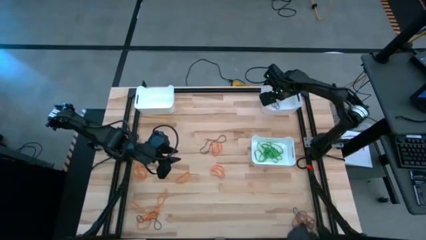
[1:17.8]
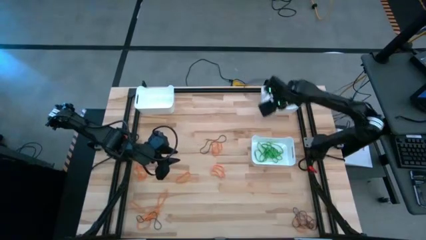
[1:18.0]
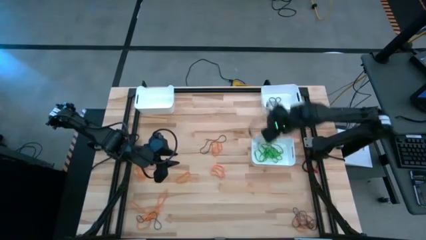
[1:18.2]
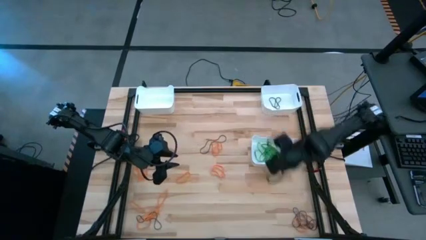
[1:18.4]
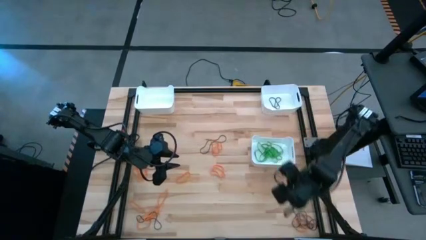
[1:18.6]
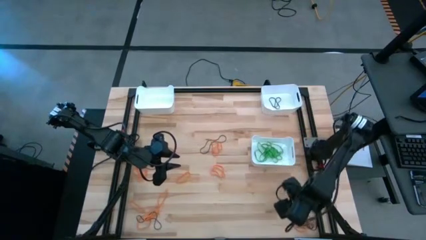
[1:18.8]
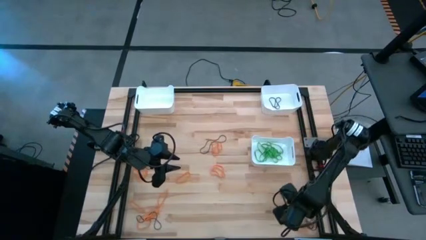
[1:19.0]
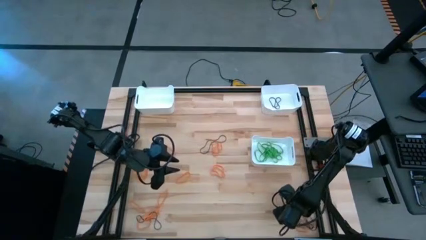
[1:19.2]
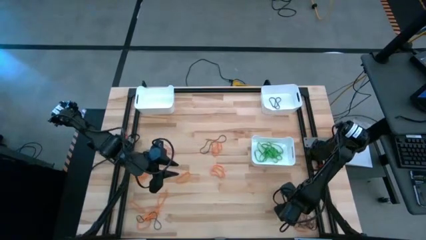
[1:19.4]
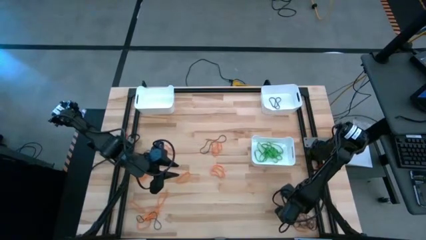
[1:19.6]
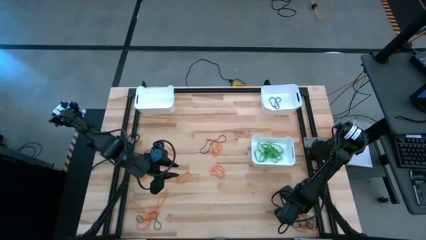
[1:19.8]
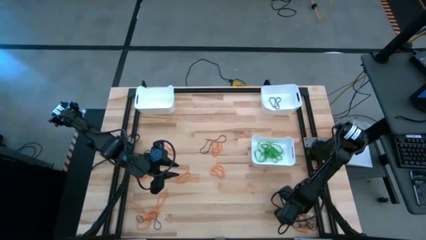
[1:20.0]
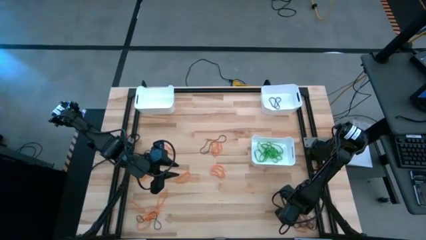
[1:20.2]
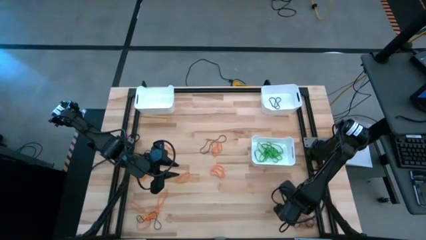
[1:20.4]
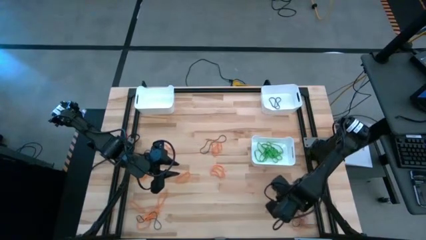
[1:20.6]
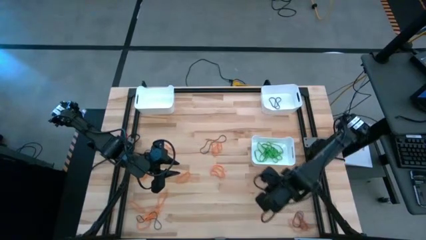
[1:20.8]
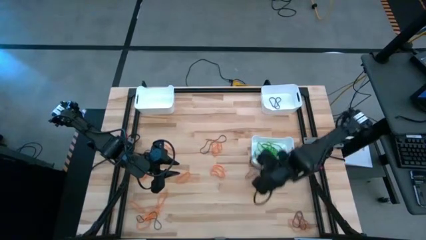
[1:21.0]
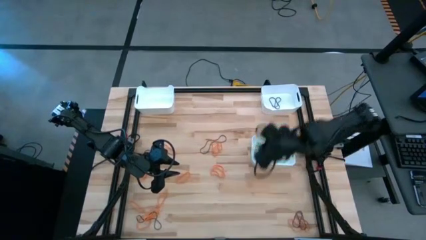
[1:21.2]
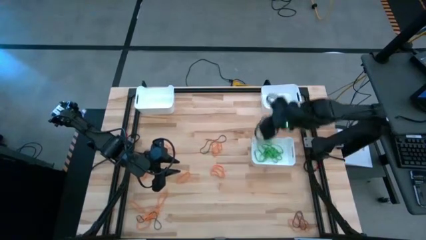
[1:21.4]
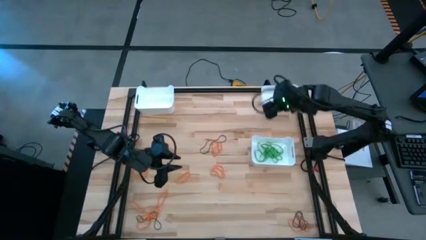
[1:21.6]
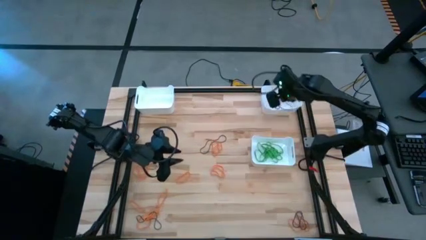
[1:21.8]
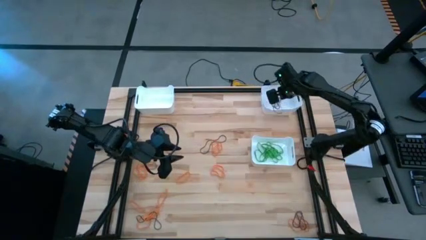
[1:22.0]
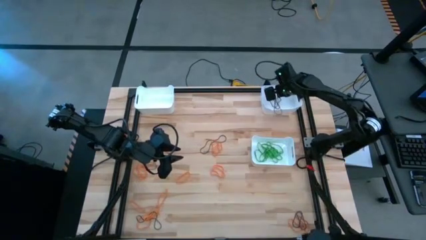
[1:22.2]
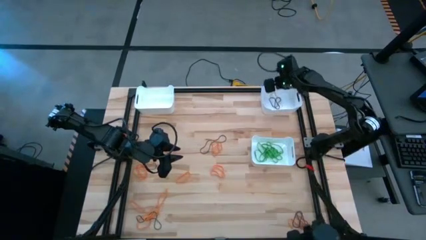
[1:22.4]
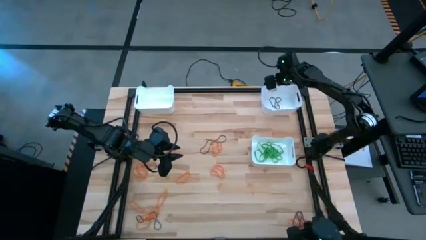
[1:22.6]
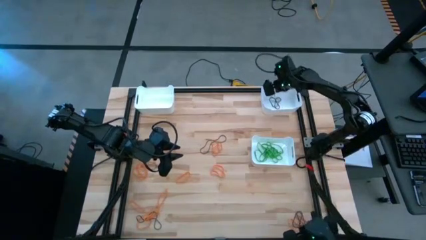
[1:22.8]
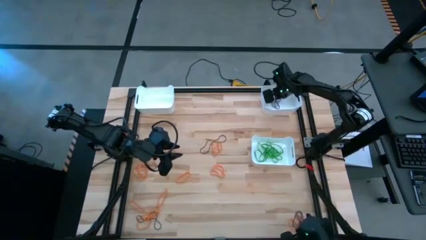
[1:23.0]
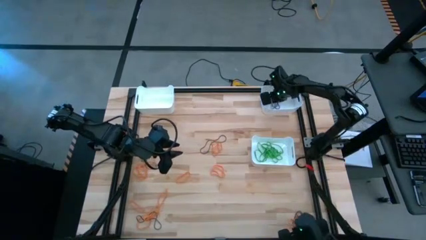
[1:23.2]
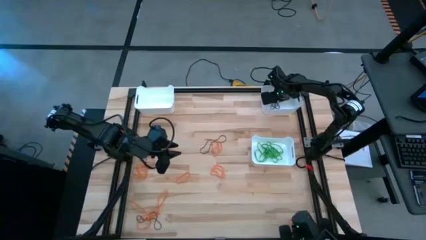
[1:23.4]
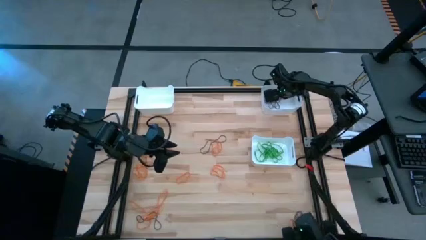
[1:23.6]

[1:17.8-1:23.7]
Task: Sort rubber bands into baskets
Put the black rubber band into the top right white bin

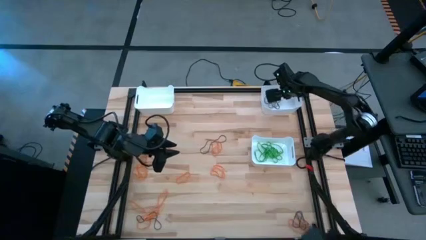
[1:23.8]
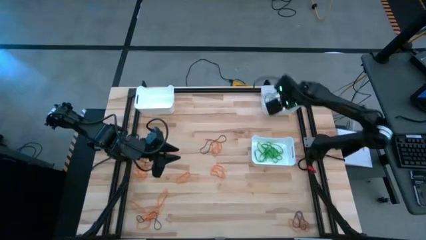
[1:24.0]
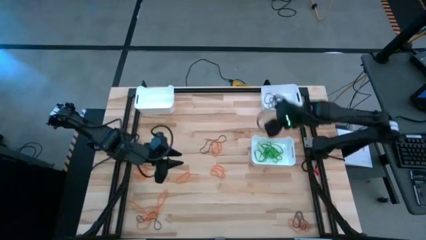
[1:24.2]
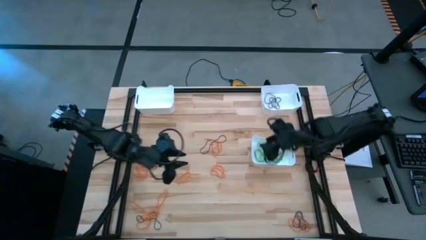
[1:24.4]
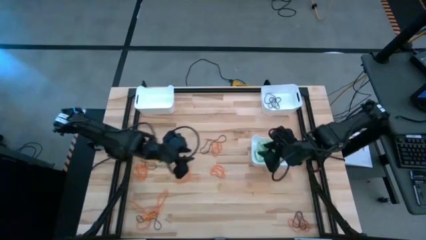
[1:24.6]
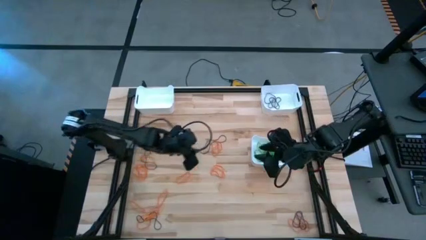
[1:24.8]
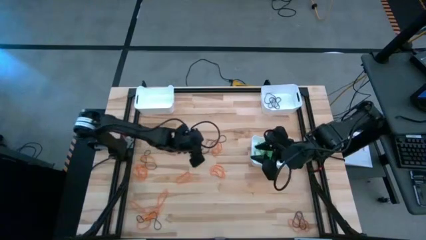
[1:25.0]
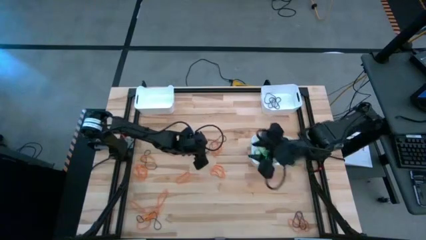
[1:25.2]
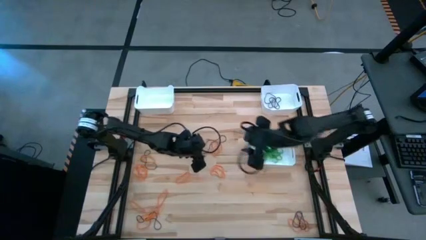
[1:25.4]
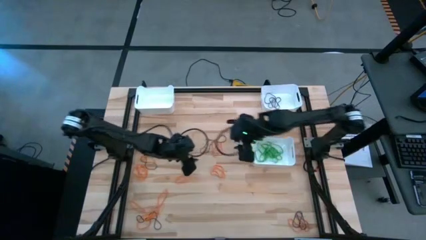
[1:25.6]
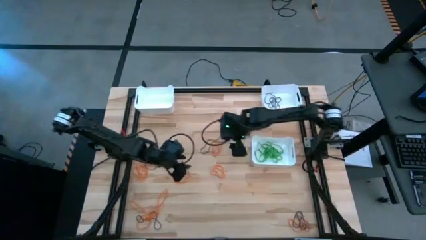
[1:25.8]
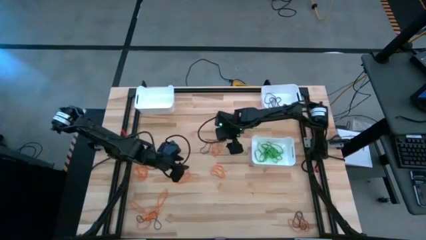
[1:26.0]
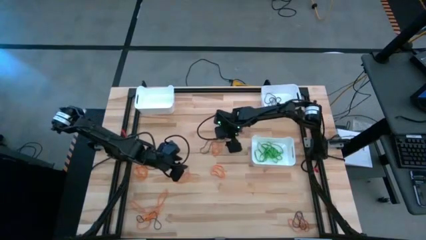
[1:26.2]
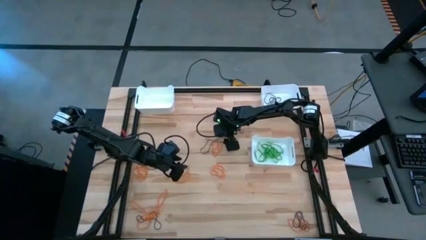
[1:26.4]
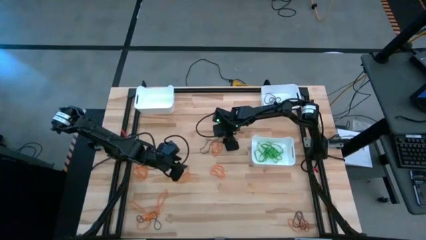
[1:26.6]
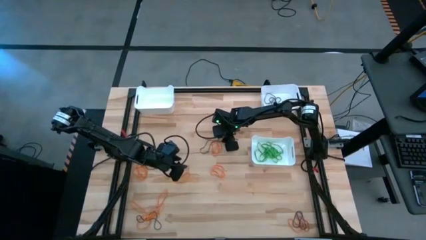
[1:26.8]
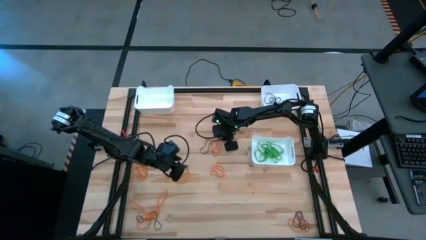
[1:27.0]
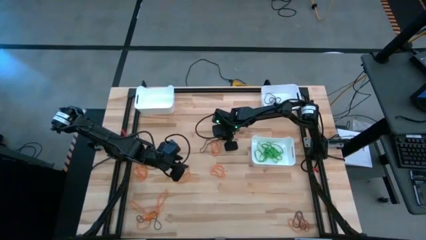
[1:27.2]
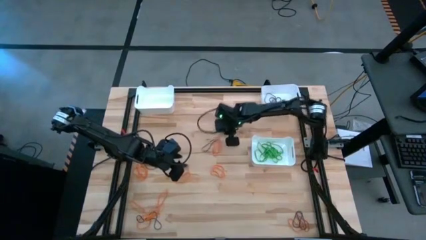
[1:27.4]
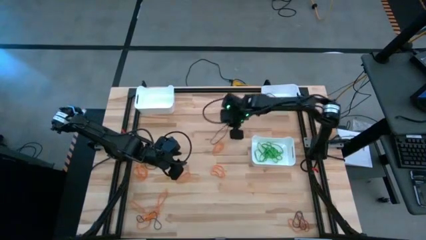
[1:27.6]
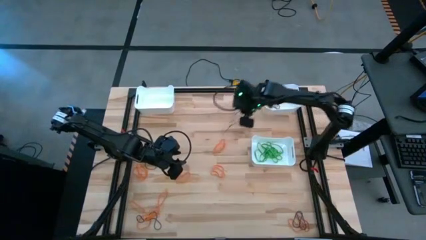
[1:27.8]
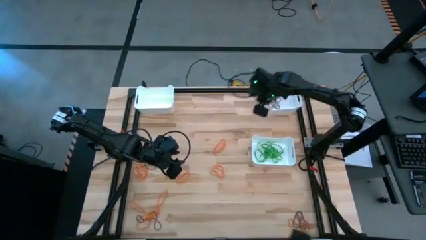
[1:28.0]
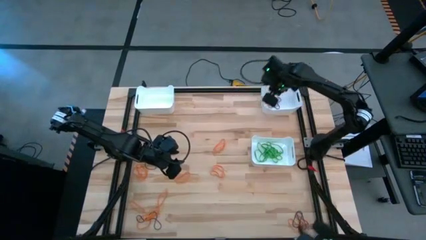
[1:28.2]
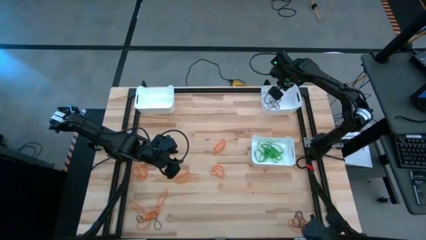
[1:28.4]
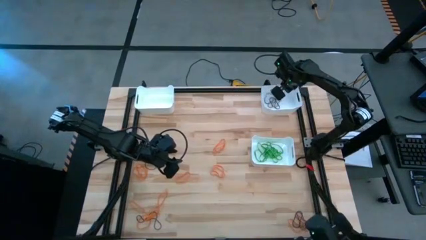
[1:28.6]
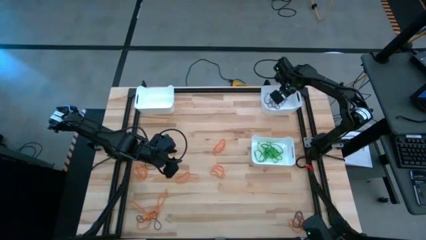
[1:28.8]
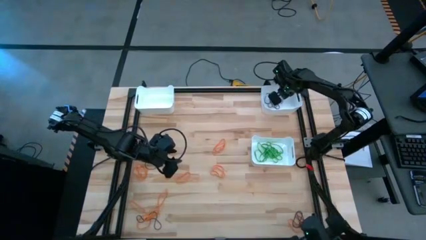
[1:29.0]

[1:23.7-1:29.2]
Put the black rubber band into the top right white bin

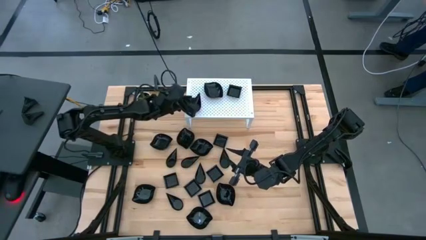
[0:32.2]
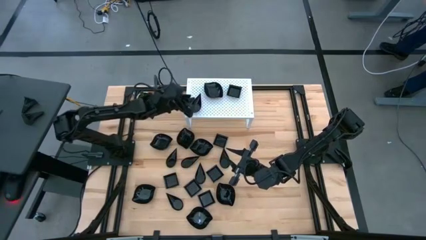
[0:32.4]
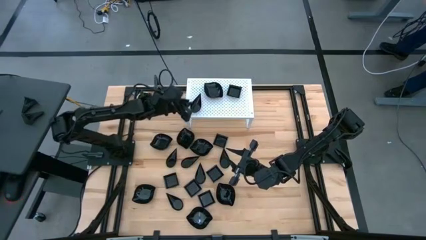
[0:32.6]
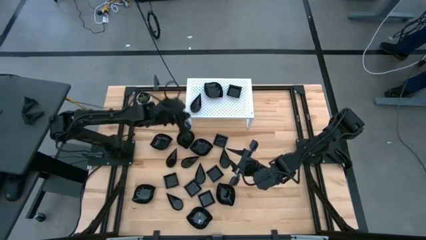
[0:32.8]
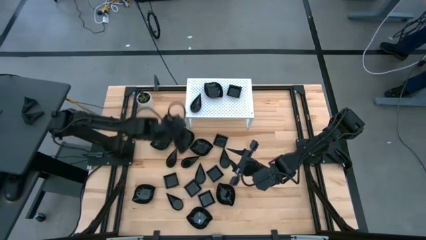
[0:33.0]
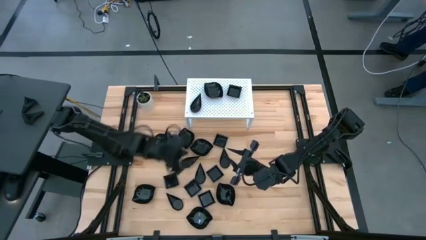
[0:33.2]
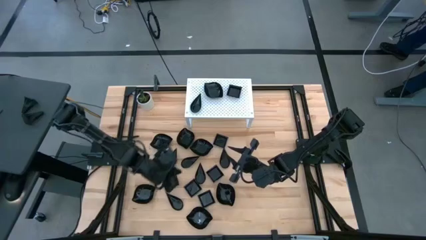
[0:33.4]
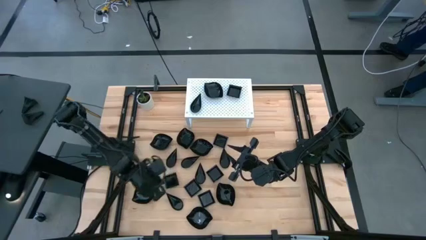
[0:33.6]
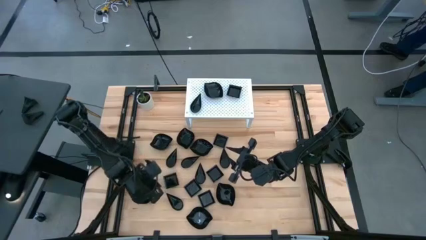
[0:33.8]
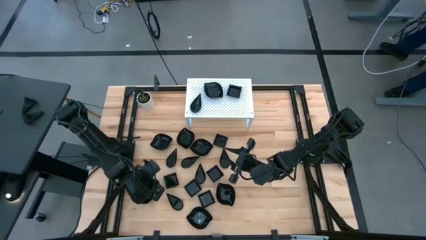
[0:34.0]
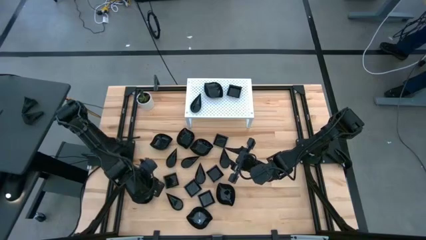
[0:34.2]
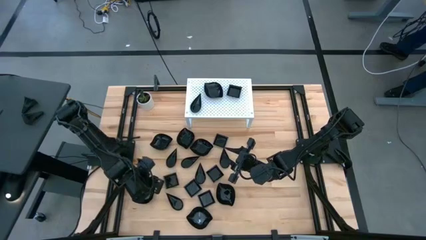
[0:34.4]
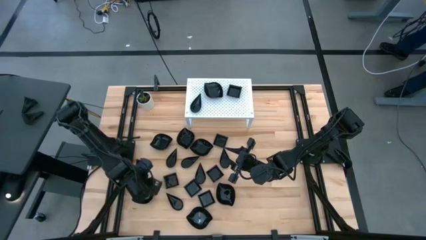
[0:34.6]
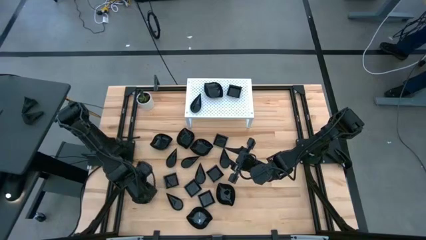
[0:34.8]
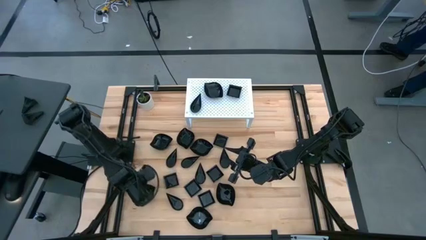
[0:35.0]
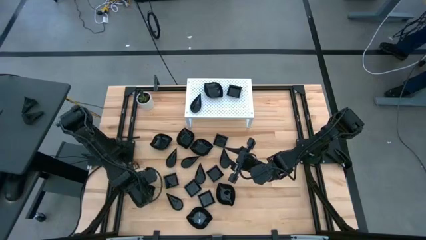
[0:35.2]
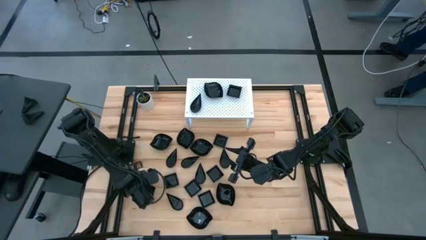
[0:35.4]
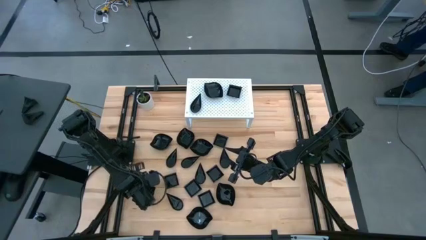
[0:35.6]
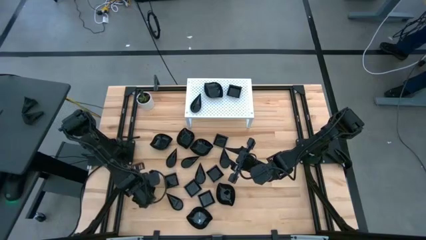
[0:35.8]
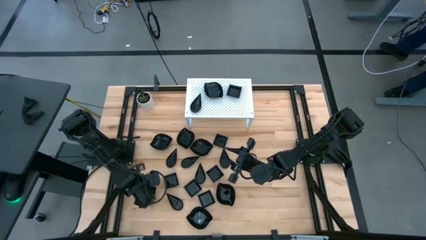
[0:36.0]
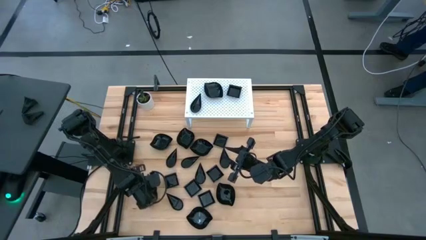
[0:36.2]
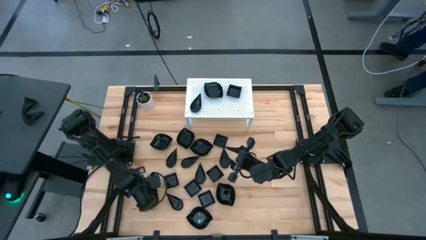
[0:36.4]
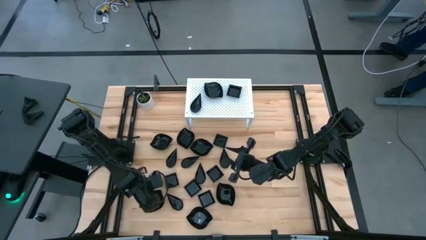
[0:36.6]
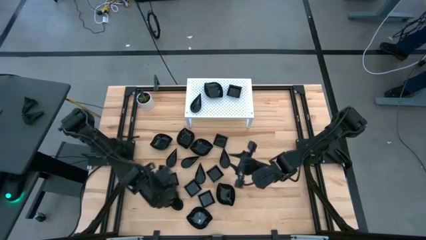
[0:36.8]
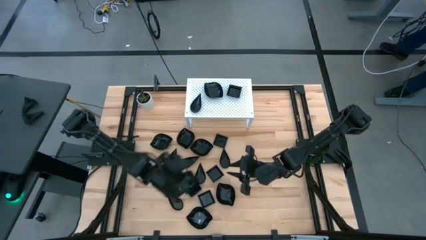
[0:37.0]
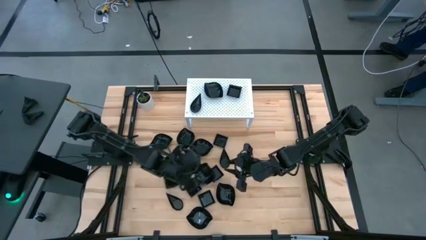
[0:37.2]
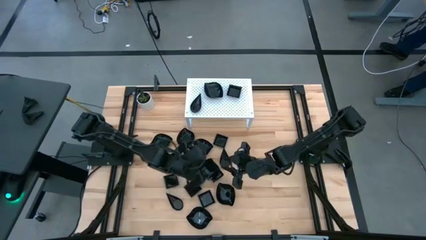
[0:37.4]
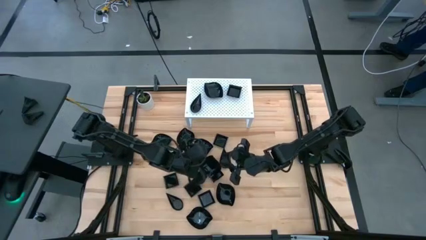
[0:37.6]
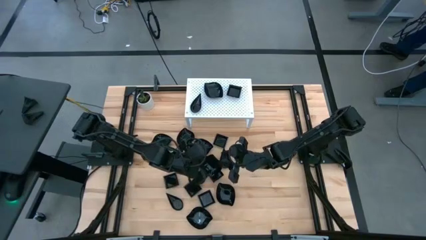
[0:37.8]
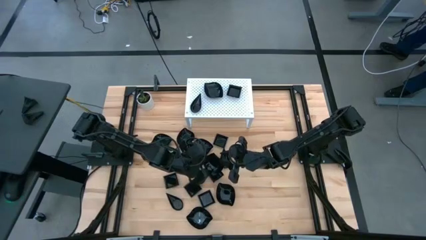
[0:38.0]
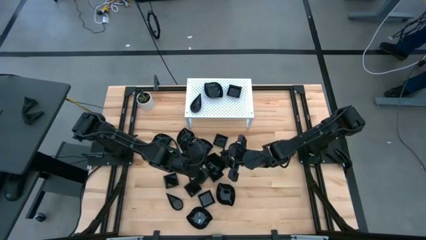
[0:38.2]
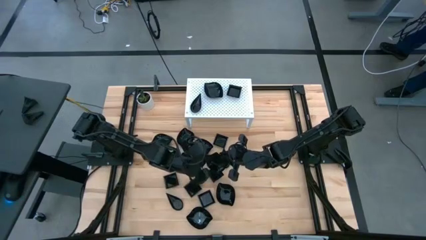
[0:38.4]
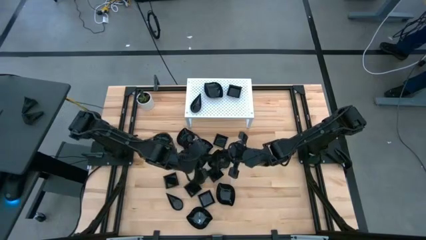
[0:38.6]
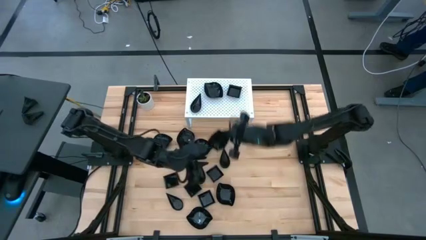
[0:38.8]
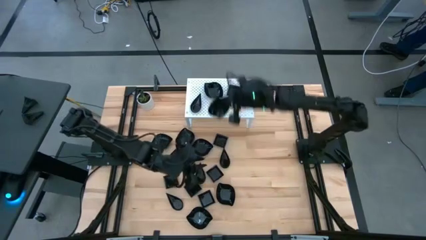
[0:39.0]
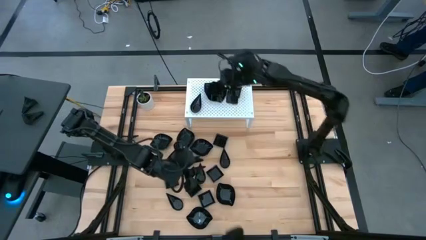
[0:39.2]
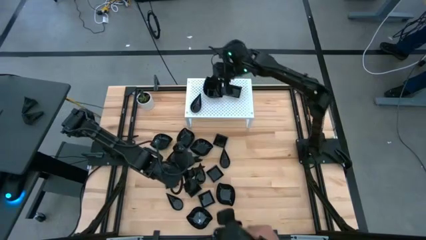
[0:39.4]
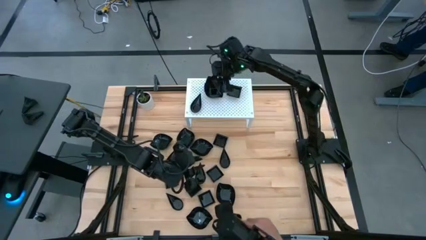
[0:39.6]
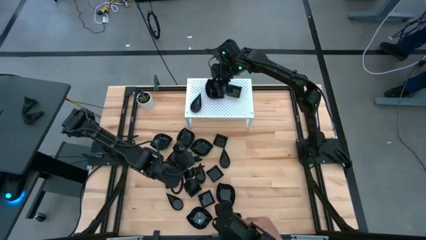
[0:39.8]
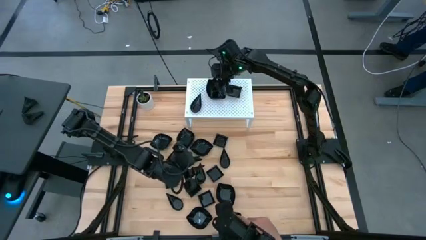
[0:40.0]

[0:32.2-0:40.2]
Task: Pick & Place Mini shaped plates
Stack the black leaf-shaped plate on top of the other black leaf-shaped plate on the shelf
